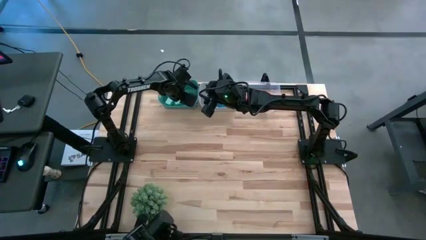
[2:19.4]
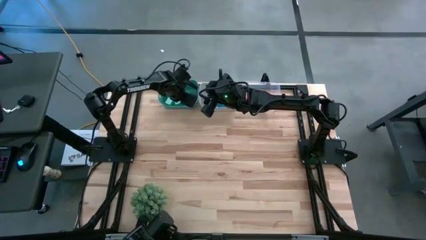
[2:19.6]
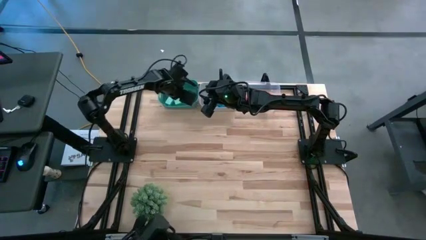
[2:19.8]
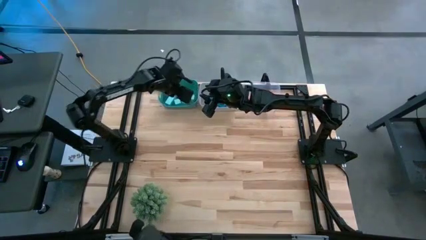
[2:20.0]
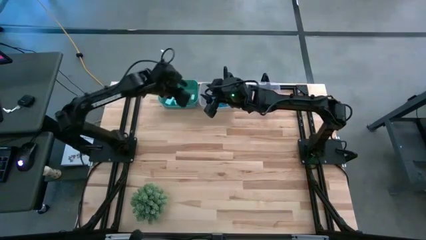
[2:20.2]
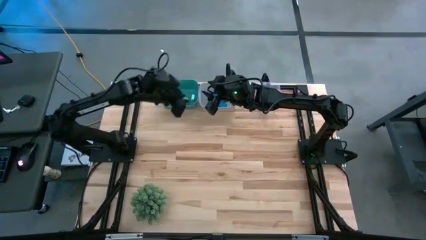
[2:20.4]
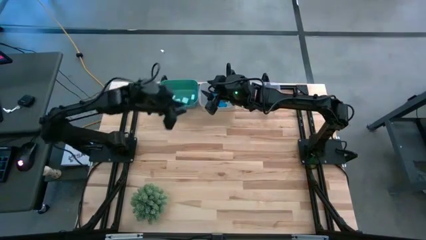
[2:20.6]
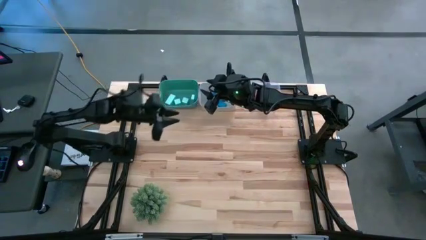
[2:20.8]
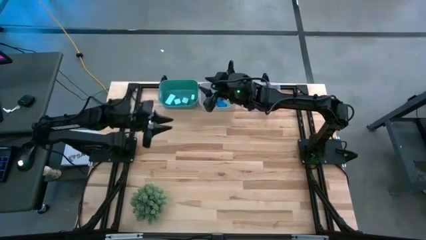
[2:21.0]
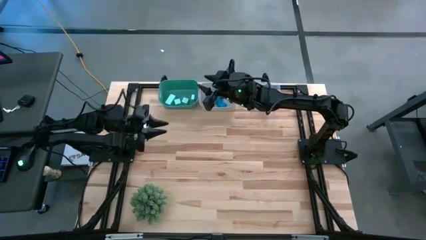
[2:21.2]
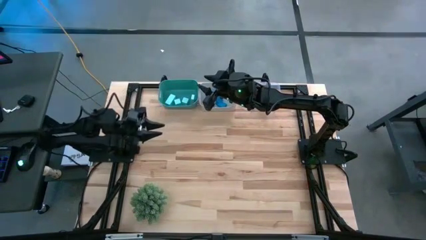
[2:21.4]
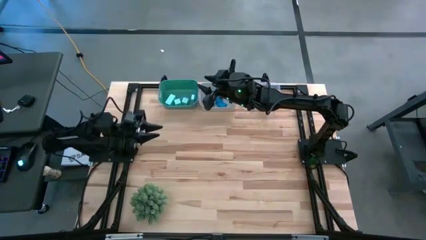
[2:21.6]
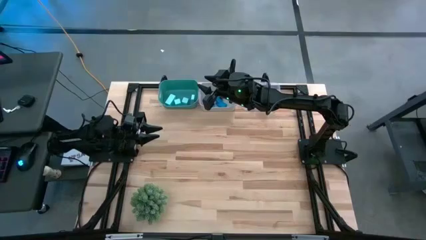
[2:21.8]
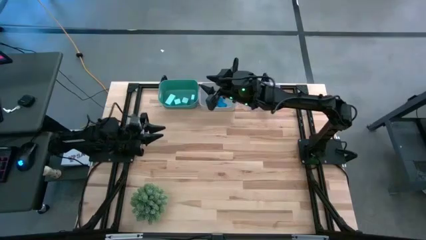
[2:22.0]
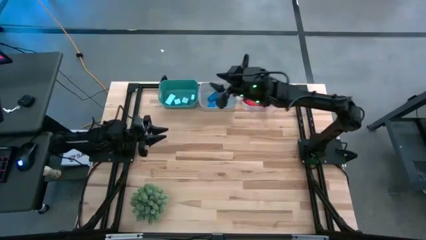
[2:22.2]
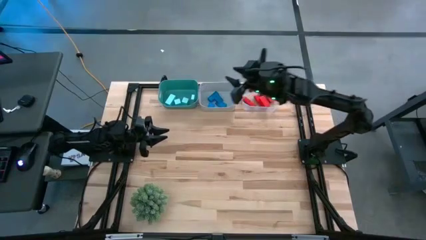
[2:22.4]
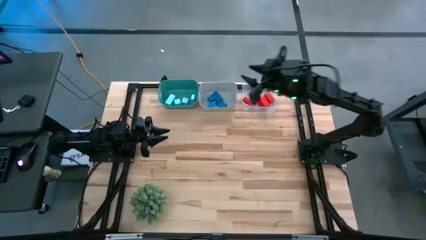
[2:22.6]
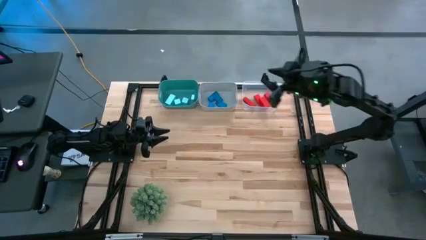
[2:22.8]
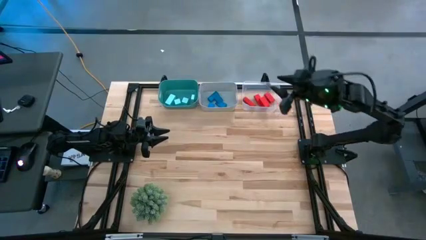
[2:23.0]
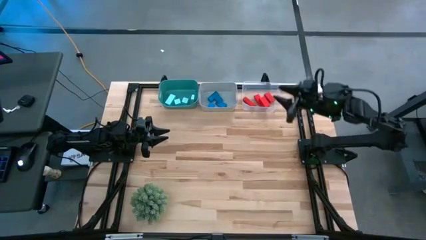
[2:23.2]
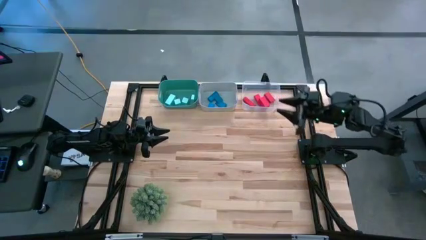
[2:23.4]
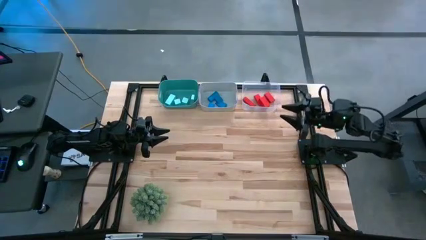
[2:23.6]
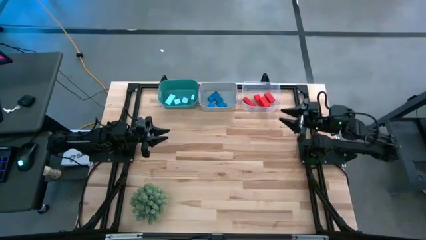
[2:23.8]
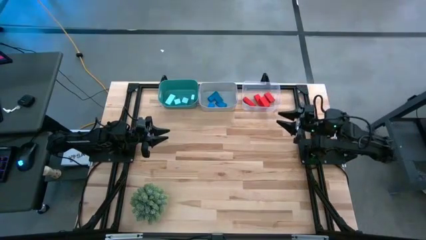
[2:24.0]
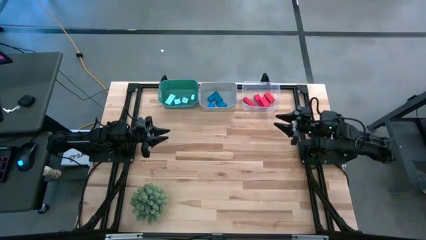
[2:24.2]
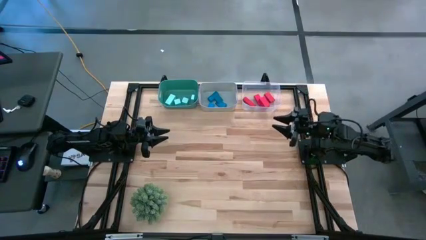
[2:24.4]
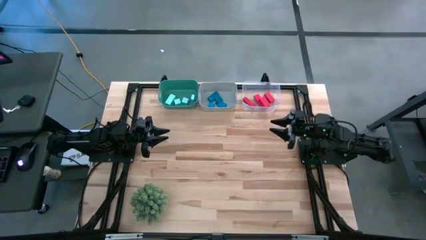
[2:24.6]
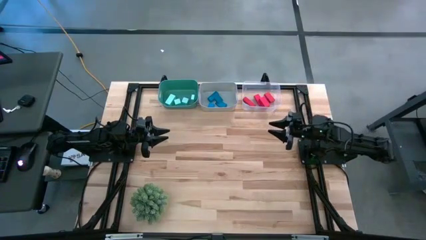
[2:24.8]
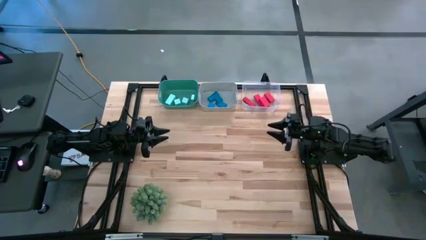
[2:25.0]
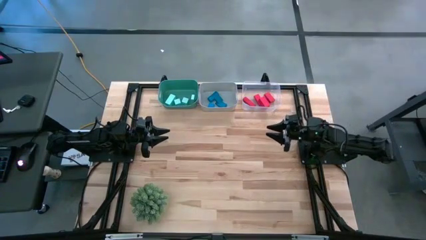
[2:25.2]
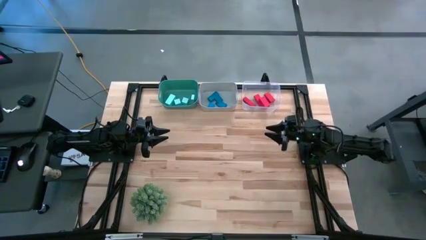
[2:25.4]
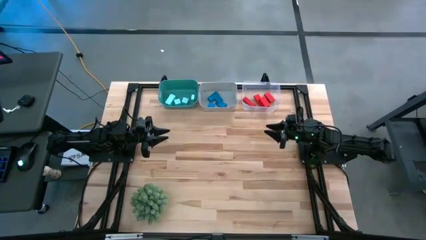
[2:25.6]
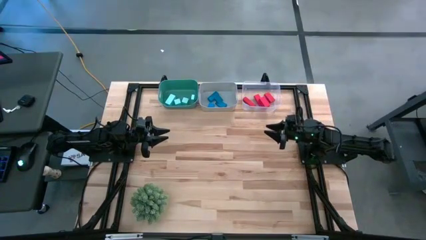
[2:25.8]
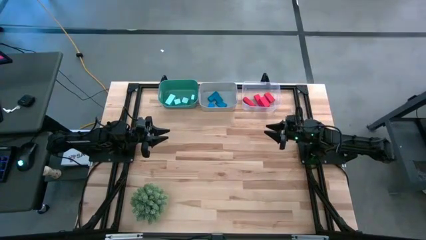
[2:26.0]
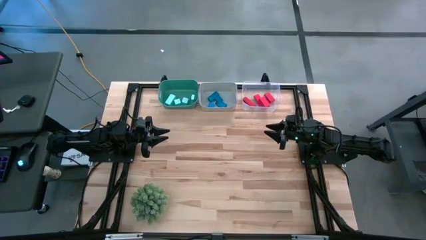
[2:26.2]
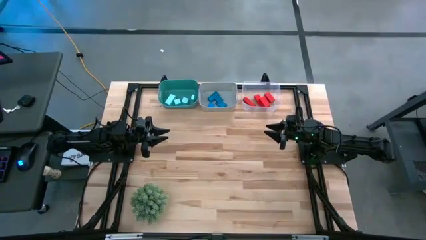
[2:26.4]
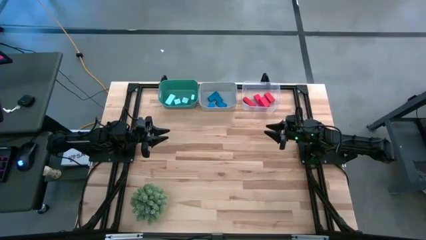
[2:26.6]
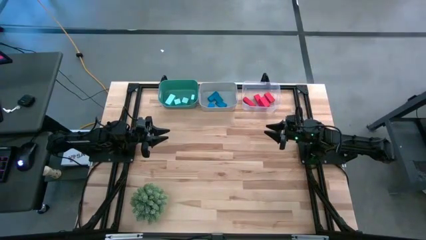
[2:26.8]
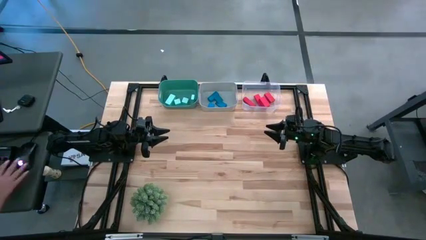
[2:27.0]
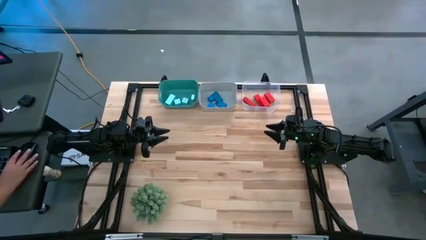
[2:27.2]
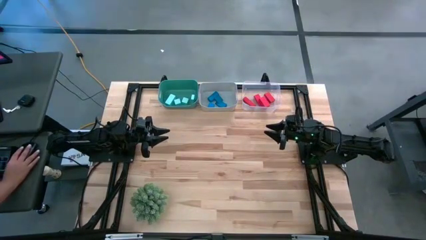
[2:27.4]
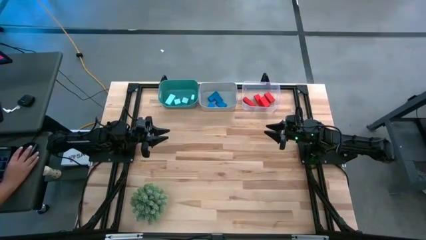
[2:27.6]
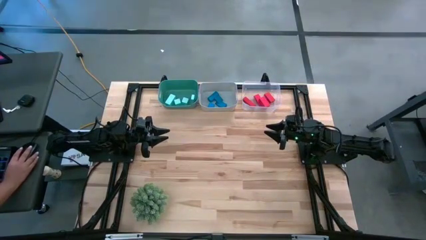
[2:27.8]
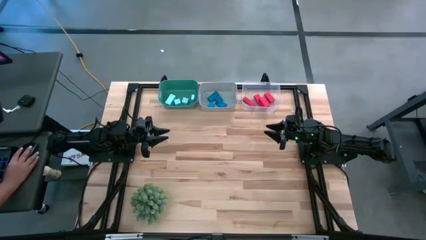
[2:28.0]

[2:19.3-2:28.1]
Task: Sort & place blocks by color
Return to Home Position

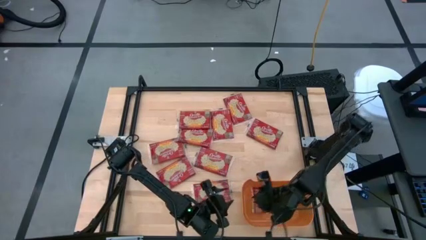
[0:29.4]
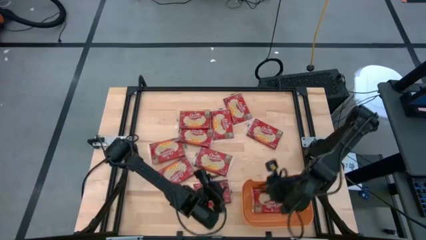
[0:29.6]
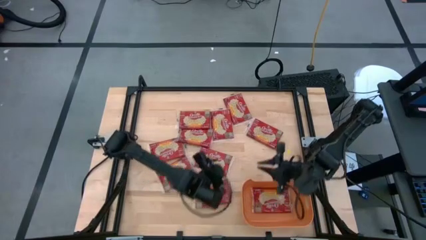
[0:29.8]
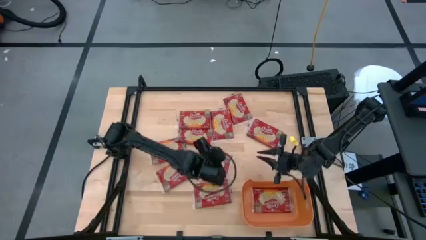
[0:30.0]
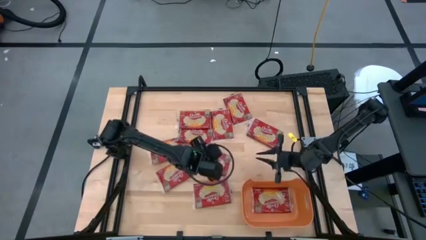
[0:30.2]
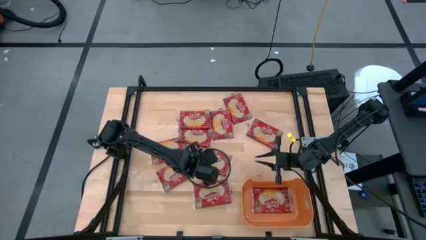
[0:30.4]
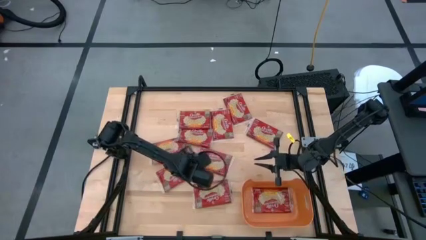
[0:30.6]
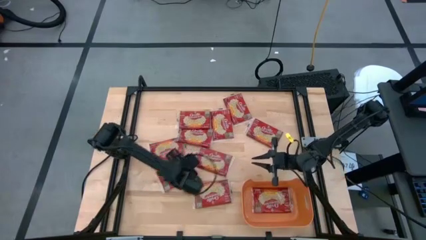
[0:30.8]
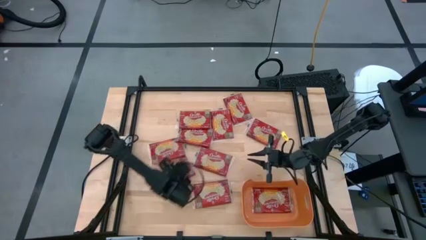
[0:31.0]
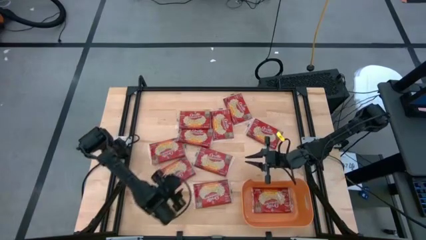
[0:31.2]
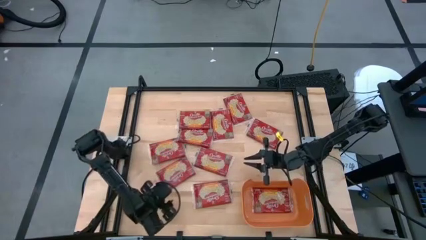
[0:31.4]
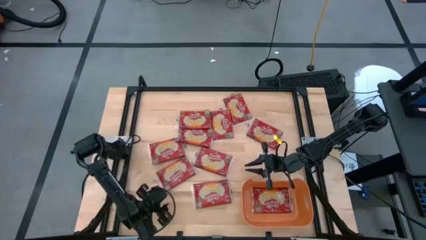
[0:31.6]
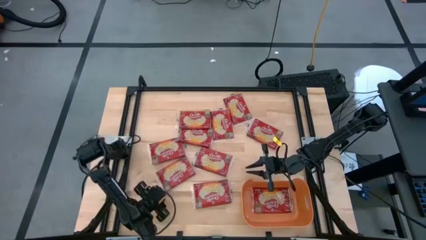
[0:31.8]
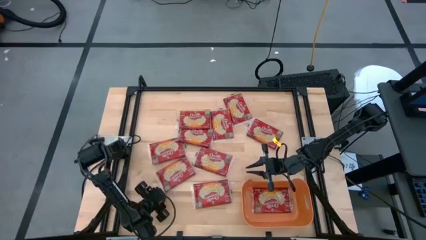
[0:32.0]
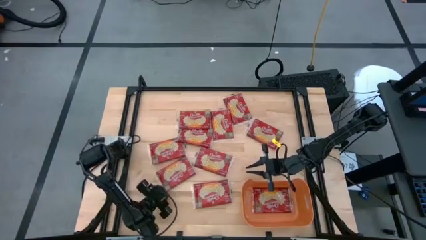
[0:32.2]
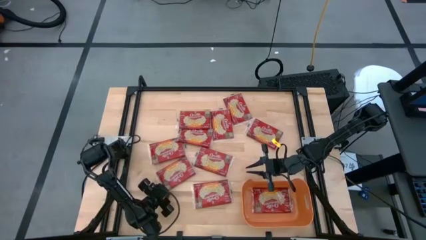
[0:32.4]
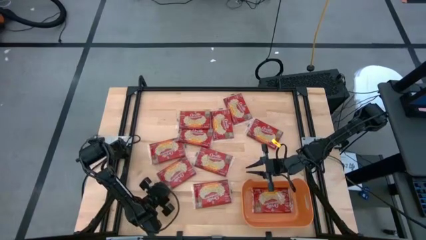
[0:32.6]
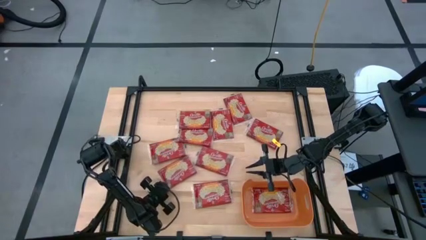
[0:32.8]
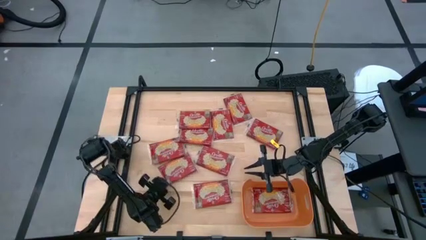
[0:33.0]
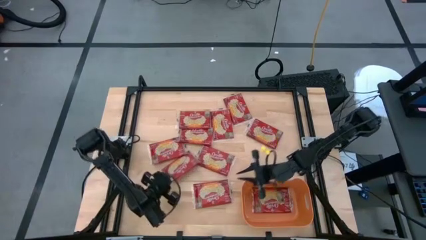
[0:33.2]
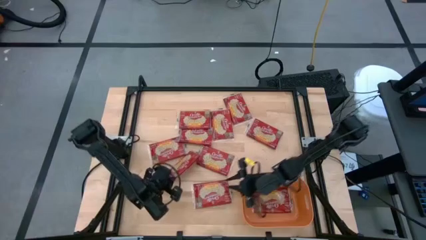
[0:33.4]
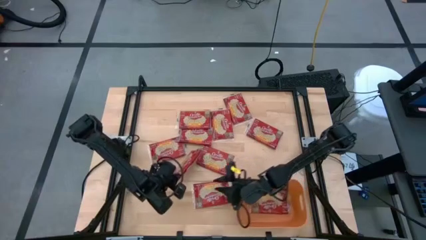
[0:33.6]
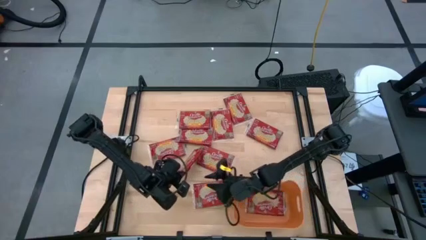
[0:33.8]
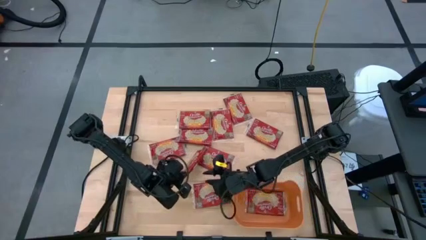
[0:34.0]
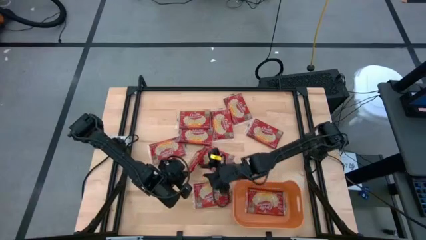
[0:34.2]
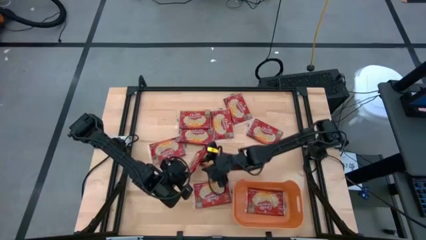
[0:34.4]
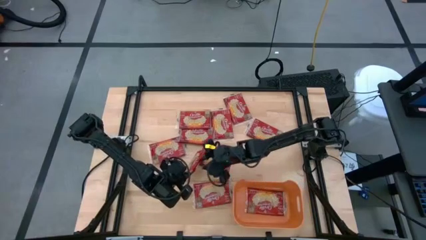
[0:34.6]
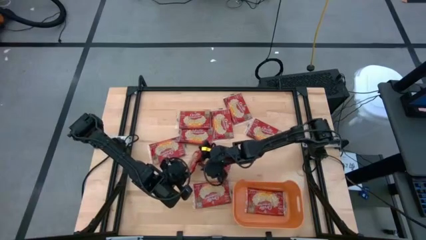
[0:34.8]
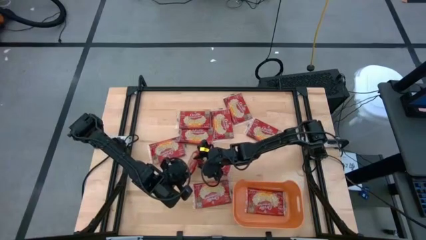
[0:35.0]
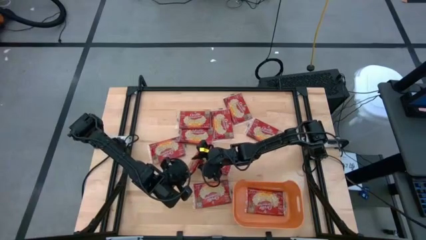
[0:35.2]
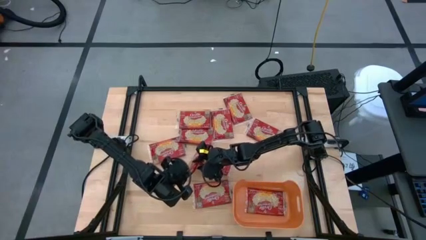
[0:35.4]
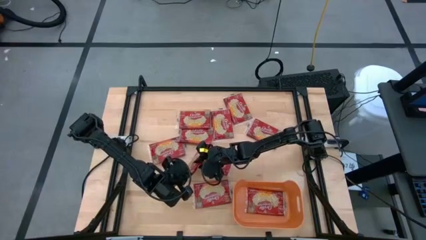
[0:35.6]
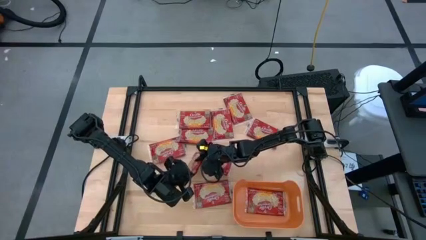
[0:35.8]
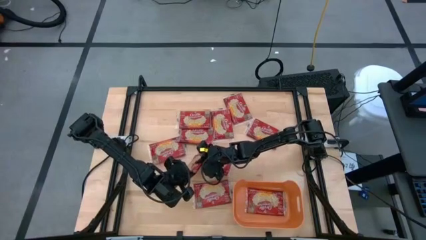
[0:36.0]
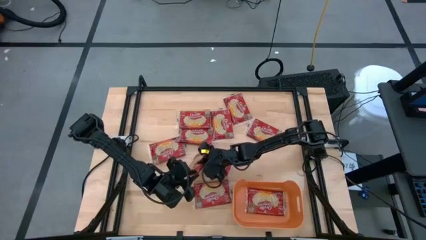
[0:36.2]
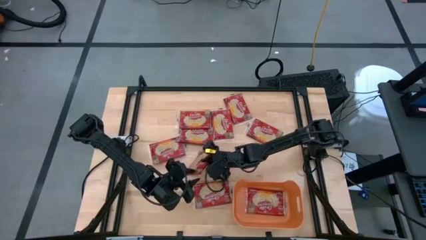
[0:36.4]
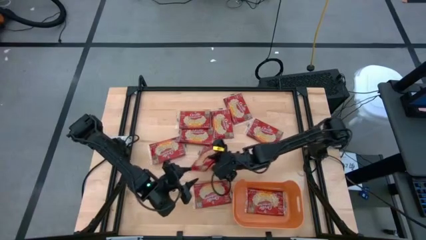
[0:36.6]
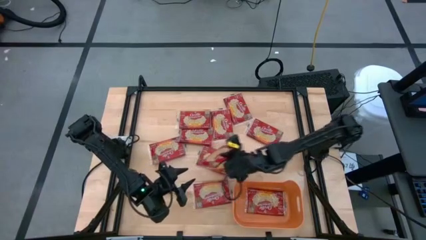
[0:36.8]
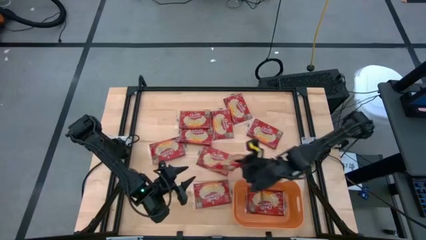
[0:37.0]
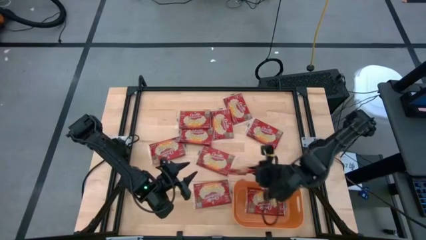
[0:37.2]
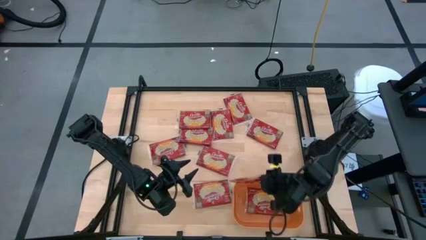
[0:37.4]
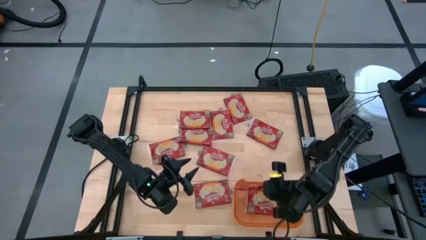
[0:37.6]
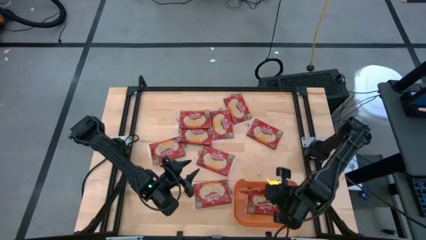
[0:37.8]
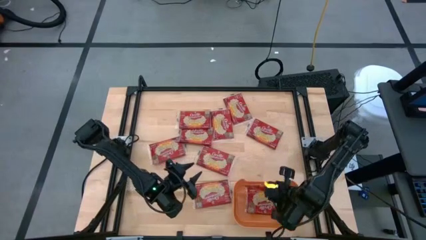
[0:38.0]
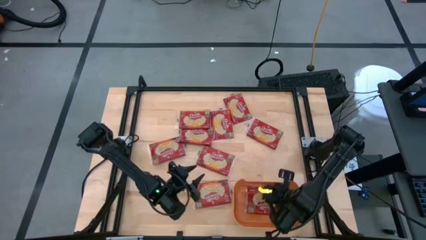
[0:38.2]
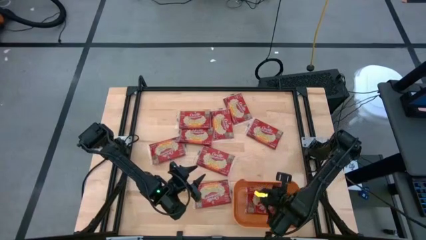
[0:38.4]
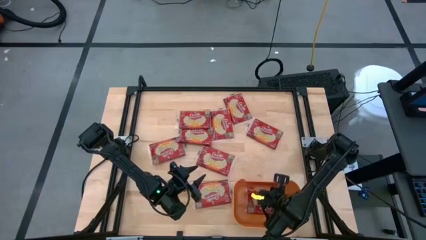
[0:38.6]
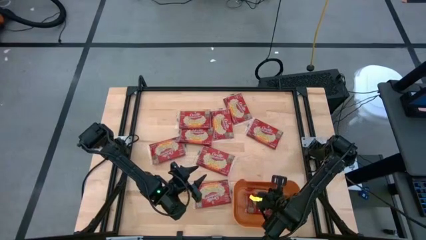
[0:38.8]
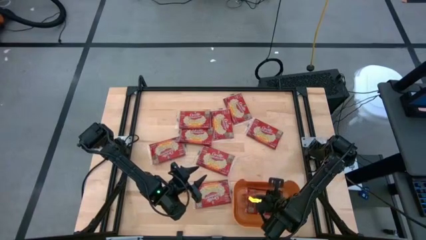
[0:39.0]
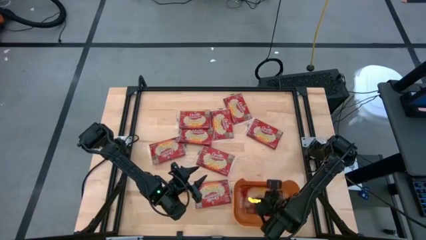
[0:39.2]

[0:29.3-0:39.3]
Task: Sort popcorn bags into baskets
Put the red popcorn bag into the orange bin
